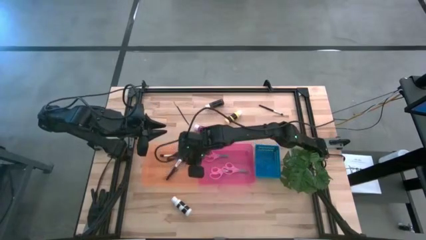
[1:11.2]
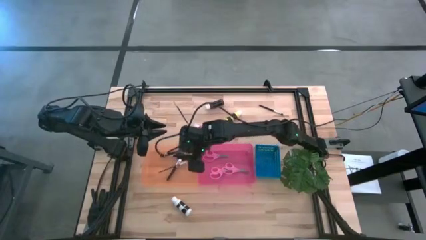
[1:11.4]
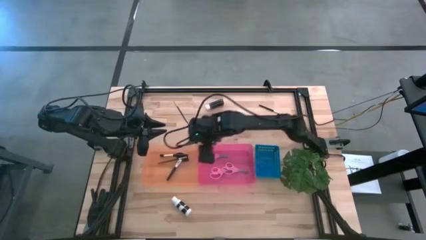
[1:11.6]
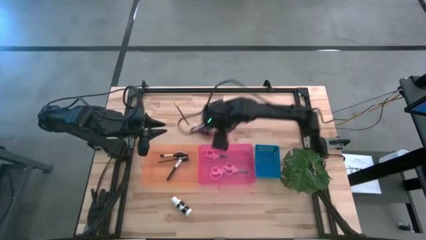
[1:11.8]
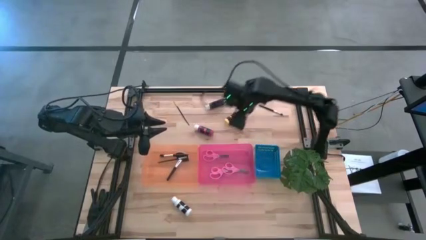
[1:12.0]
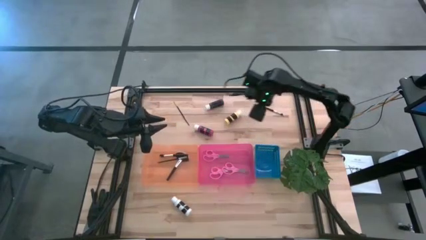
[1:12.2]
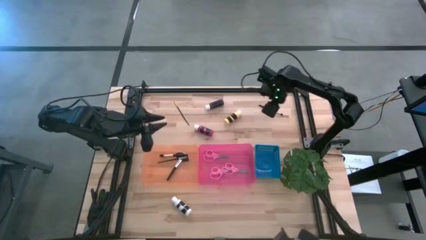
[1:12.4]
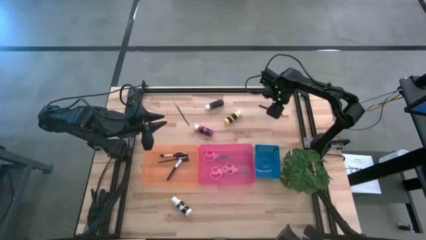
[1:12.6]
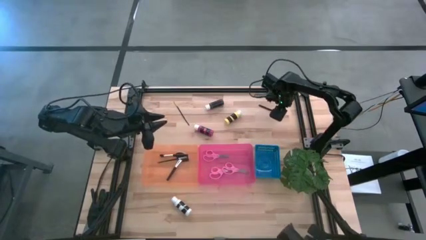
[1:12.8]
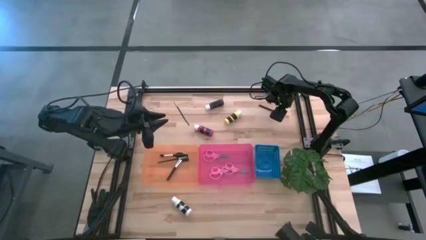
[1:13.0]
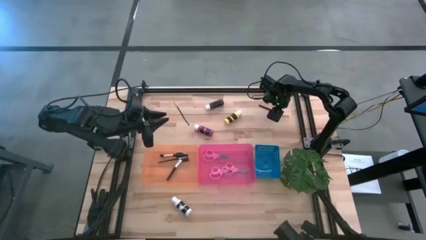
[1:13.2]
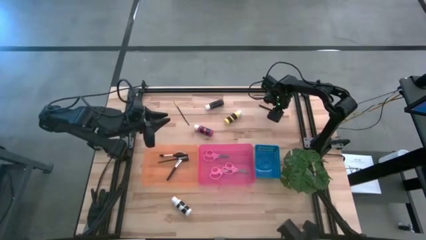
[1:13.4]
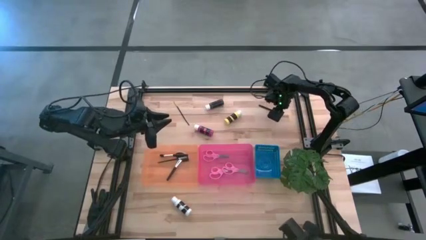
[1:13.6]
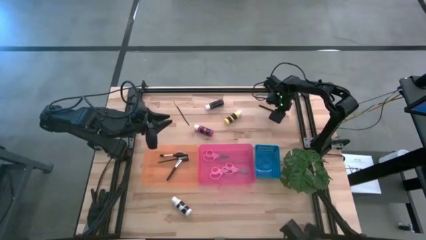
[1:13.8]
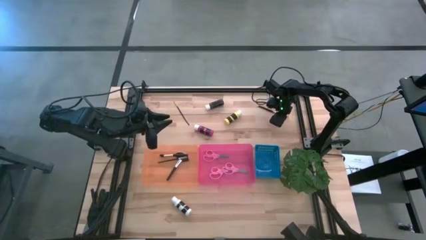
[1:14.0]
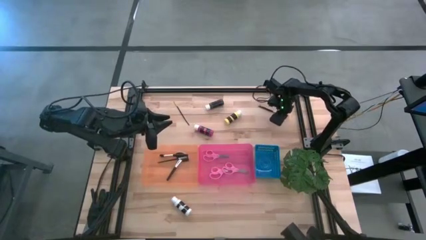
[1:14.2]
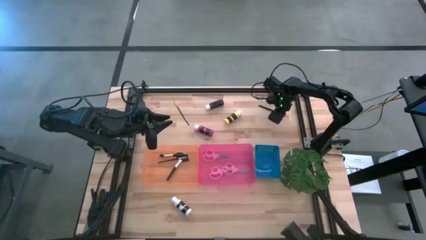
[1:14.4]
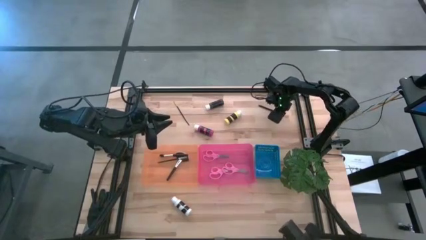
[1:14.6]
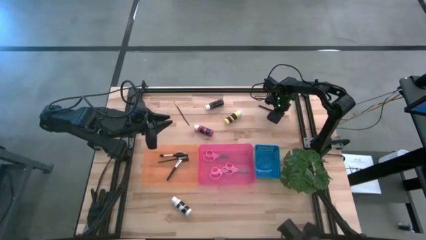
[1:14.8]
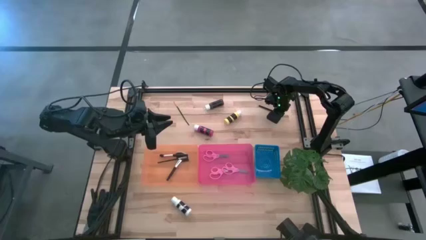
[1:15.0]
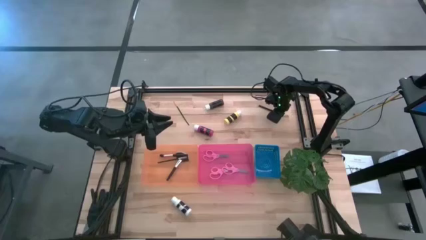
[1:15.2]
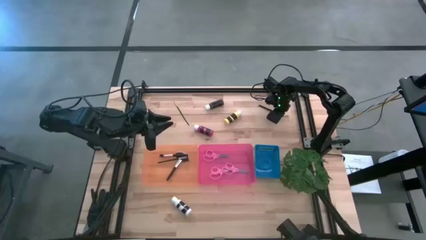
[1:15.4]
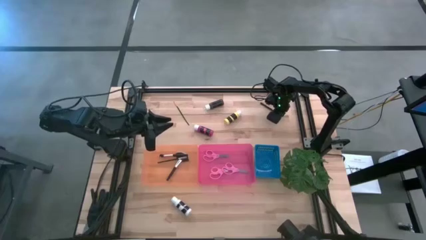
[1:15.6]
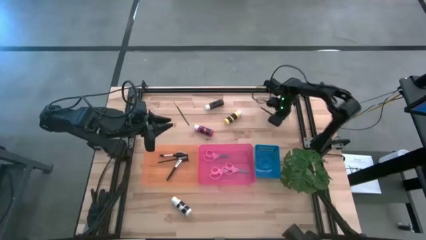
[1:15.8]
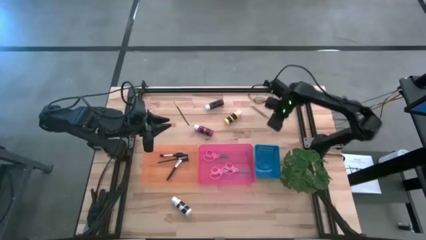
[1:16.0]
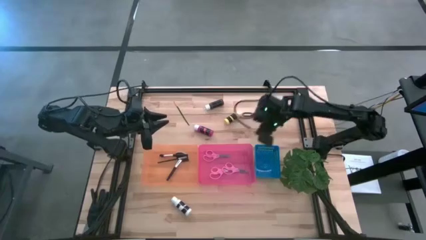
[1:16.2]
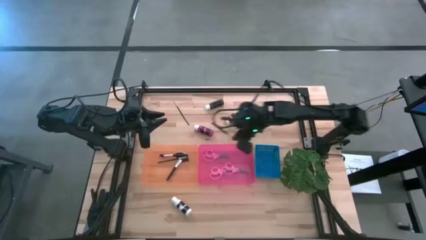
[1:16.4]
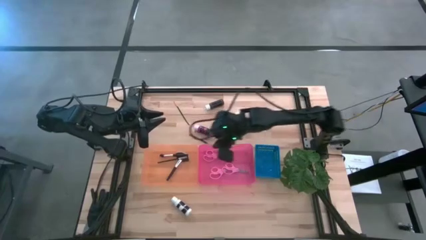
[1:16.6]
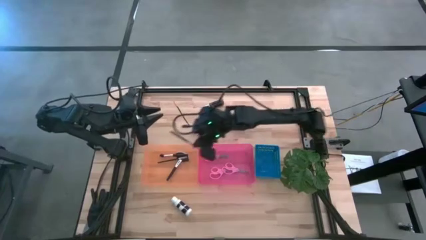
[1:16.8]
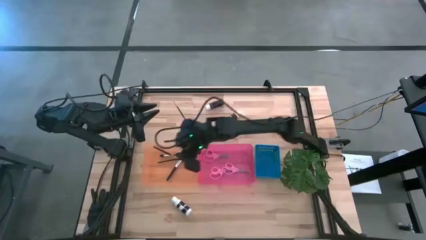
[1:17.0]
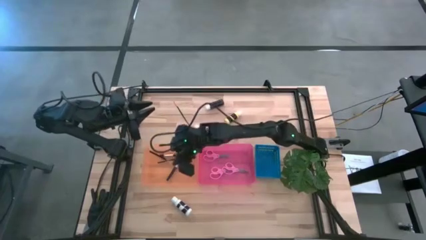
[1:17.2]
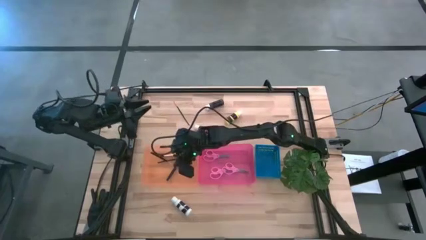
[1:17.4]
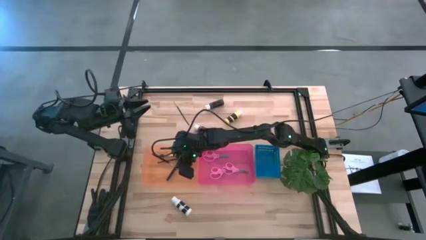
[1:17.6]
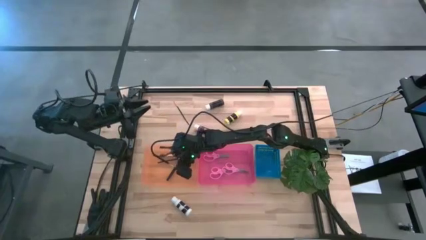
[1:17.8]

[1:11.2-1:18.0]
Task: Pick & Place Paint Supplies
Put the silver foundation brush into the orange bin

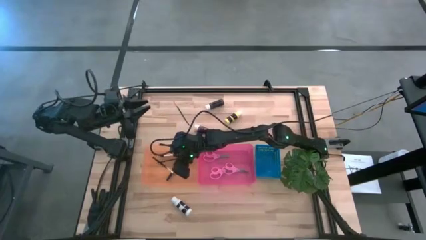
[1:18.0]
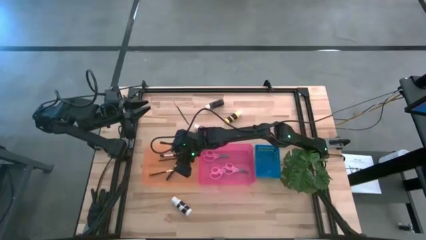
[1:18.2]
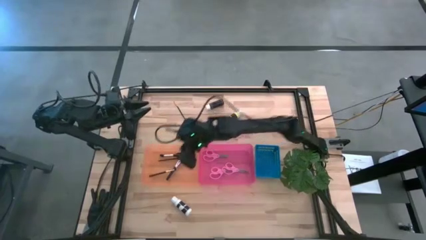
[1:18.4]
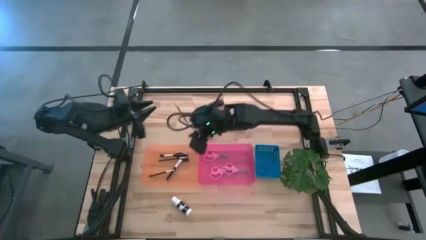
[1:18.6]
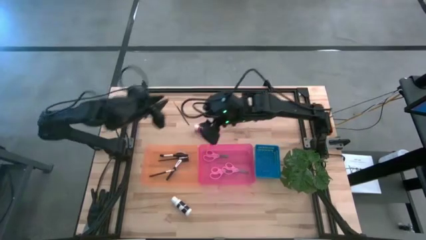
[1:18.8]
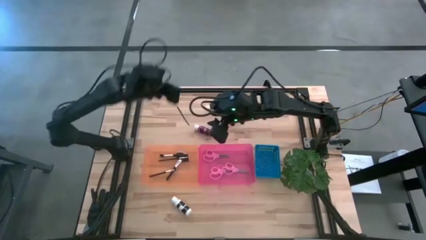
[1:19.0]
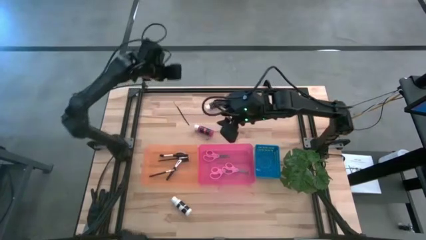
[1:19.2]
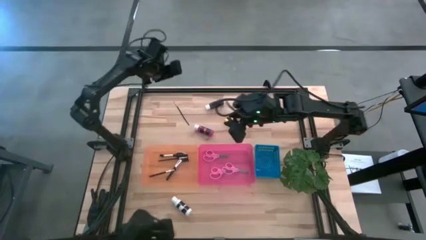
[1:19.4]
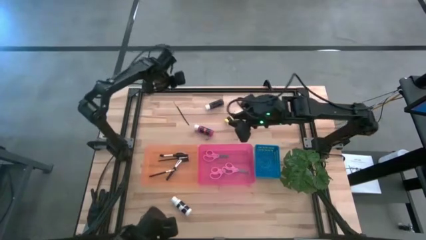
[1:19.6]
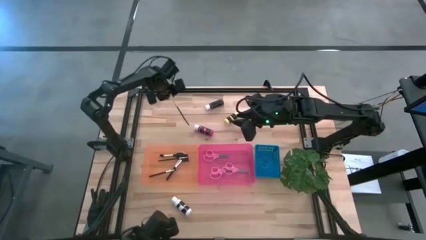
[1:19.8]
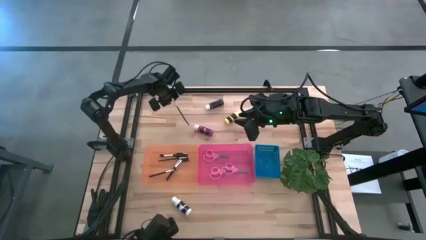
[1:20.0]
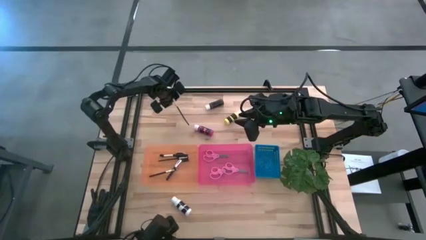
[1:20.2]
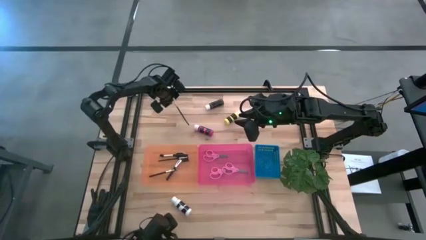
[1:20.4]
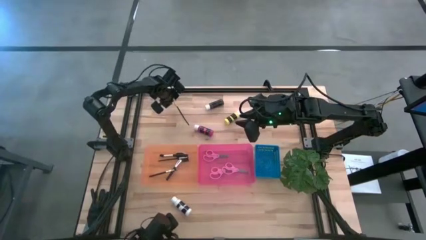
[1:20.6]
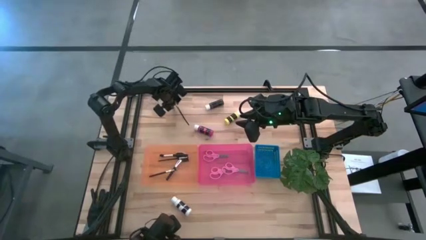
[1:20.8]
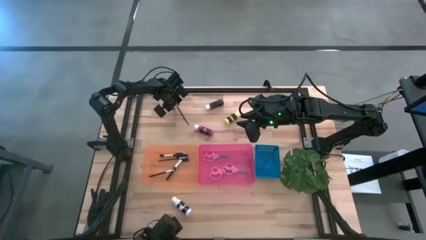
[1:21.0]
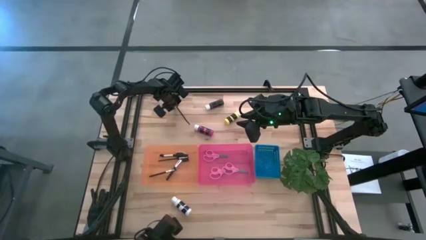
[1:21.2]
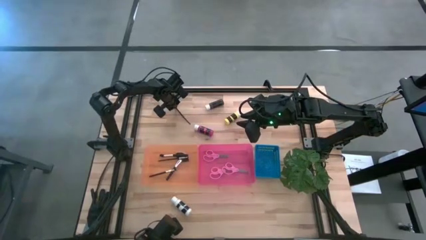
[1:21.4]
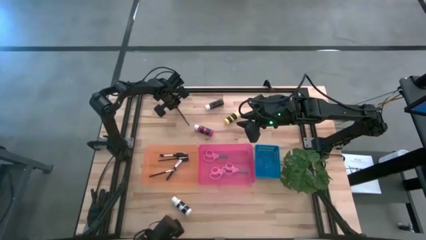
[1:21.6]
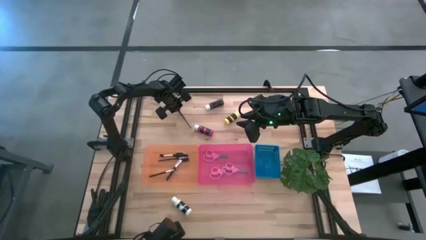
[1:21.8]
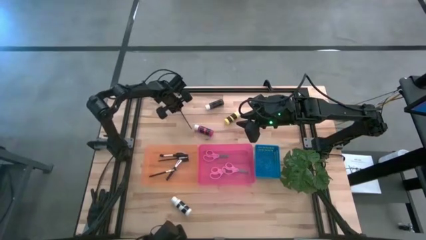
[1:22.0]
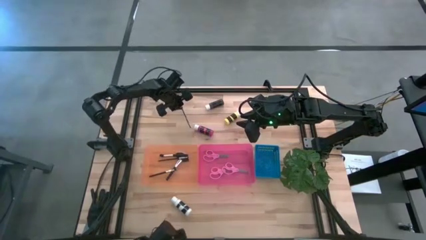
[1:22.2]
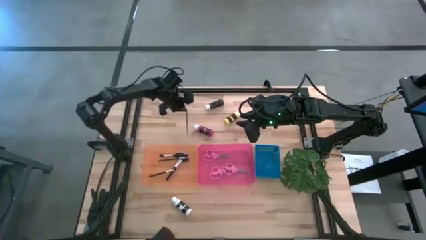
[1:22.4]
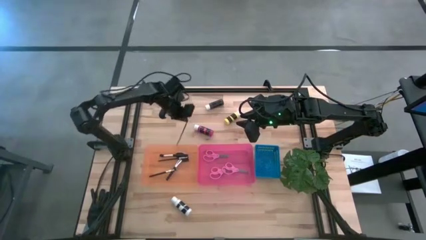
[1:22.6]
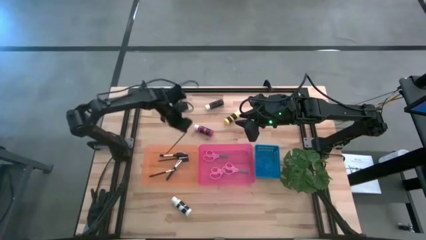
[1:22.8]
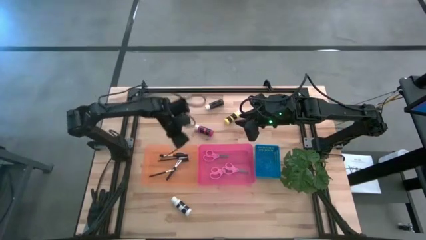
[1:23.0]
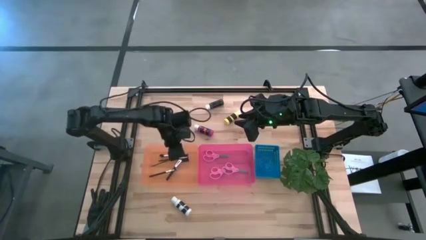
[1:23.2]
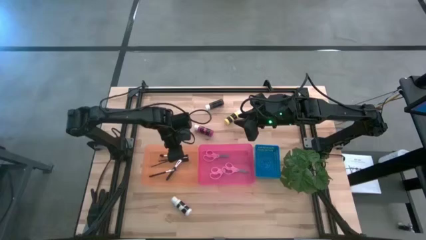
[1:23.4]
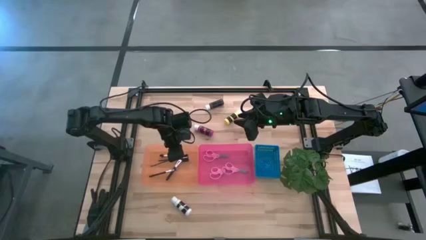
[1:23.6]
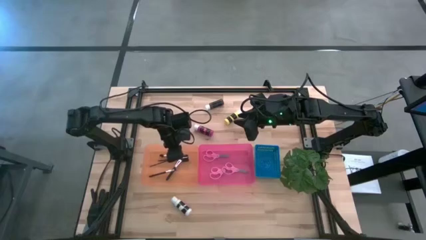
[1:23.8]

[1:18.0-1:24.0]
Put the gold paintbrush into the orange bin
